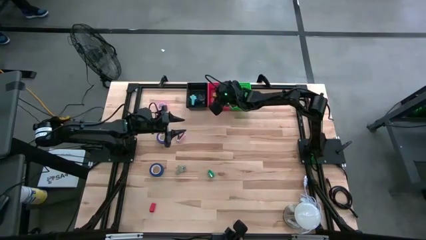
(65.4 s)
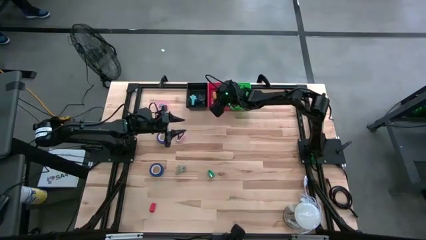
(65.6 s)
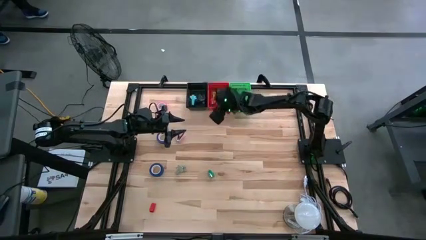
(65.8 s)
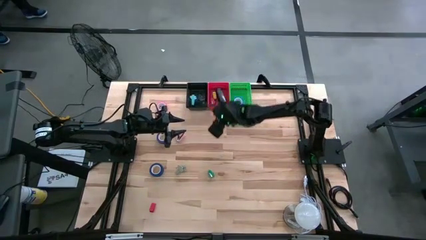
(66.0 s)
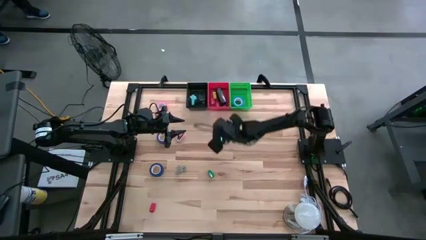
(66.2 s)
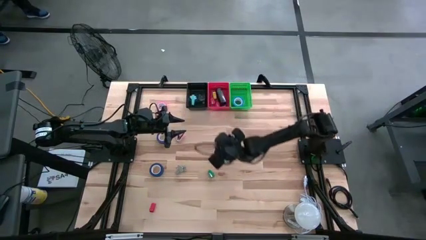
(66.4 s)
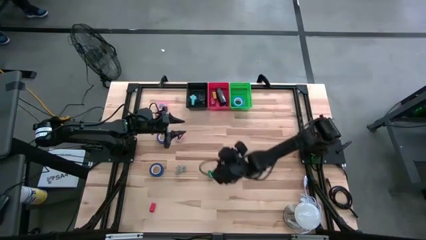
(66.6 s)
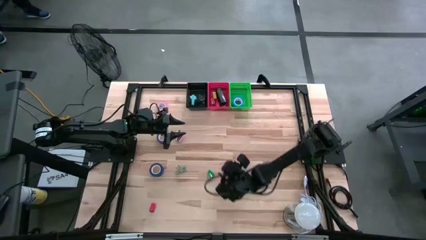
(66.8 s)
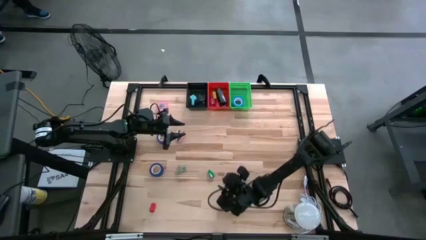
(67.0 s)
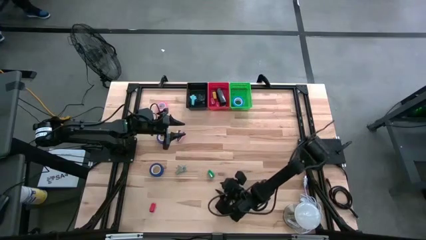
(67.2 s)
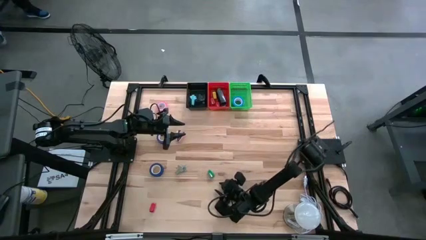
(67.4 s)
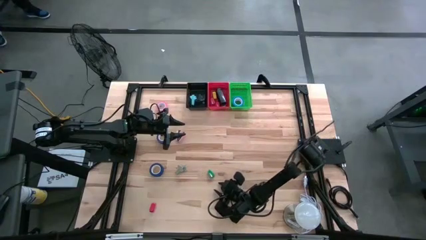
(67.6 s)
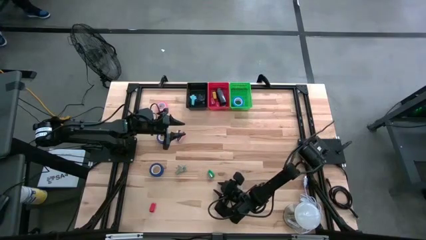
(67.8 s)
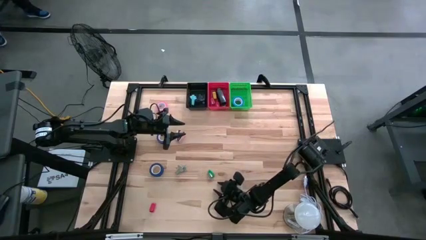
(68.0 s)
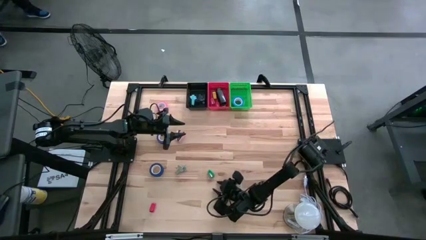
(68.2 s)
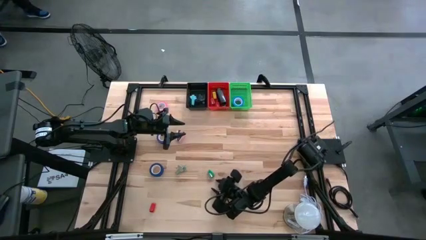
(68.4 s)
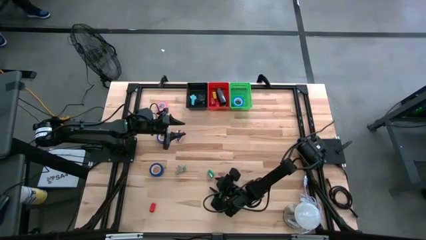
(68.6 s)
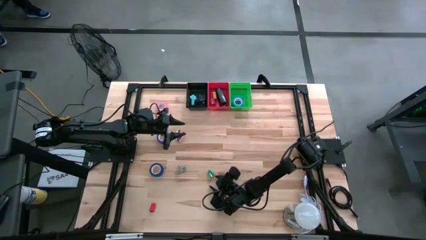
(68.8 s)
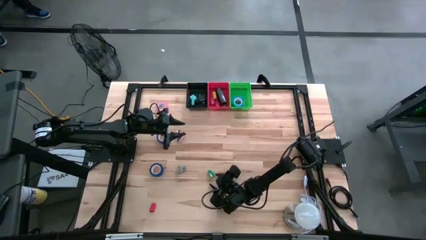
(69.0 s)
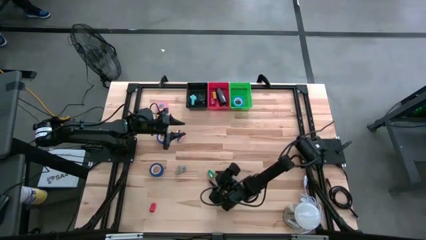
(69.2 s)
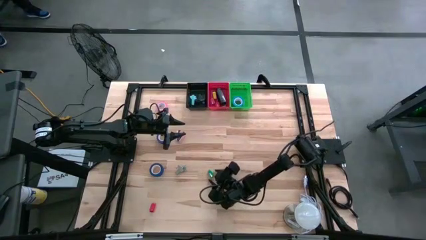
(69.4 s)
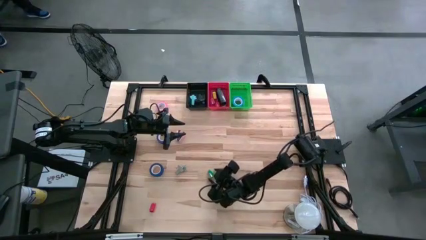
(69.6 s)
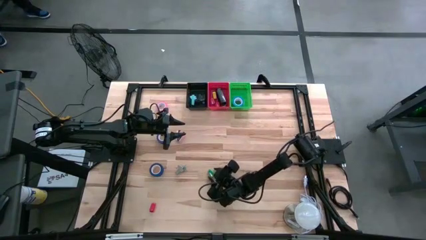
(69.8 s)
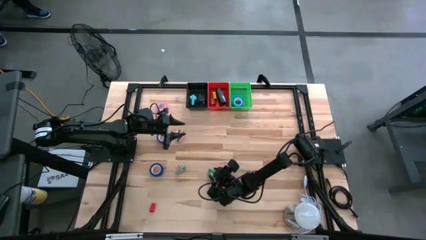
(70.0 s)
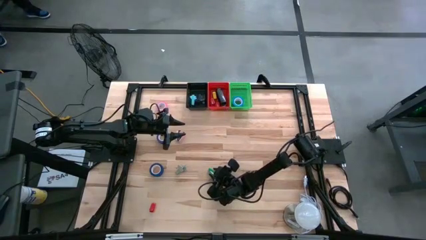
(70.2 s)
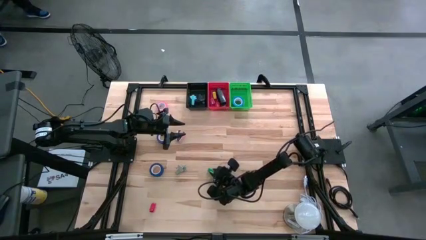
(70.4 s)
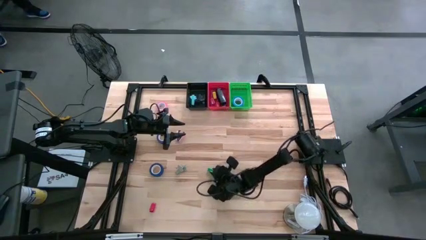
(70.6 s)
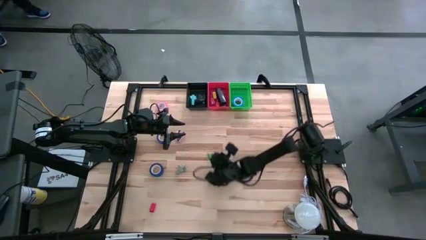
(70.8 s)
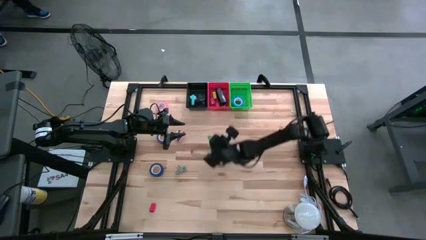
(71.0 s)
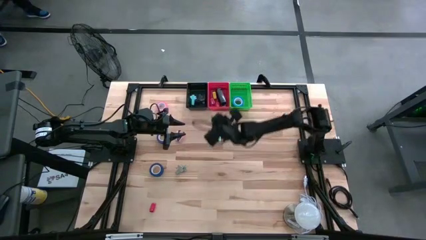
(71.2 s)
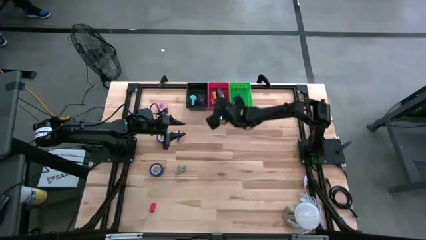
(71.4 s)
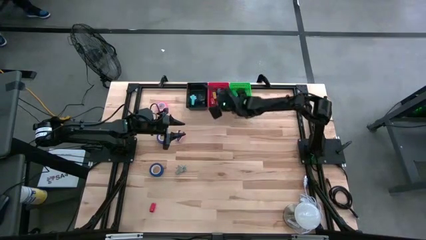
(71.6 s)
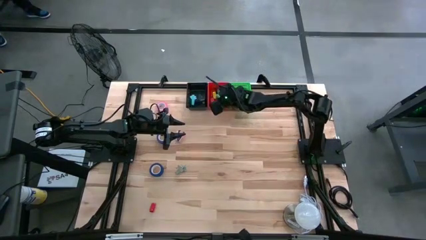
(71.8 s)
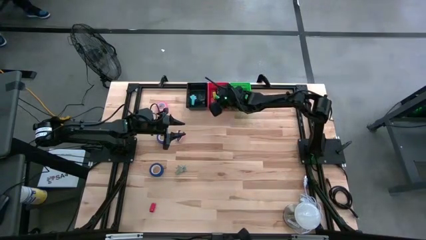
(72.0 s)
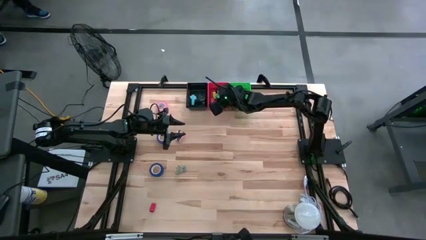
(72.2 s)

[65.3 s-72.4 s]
Task: Pick and place Stapler, Stapler remover, tape
Put the small green stapler into the red bin

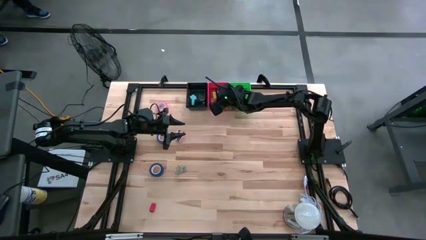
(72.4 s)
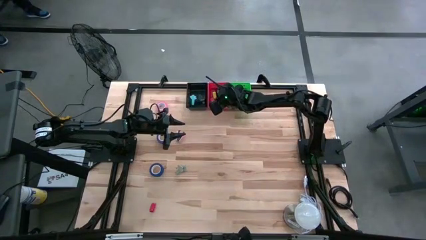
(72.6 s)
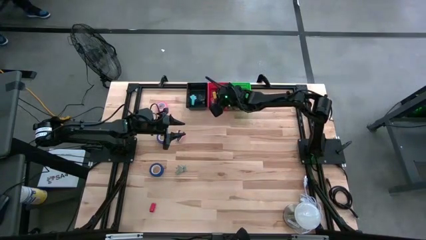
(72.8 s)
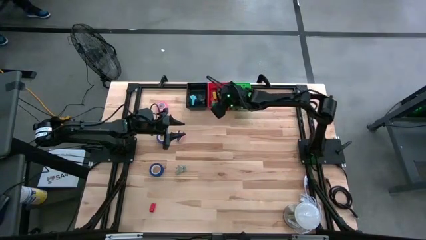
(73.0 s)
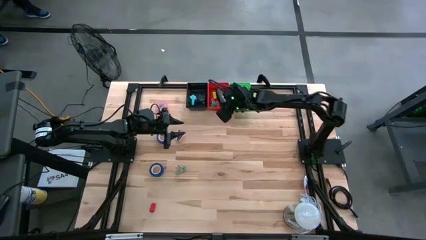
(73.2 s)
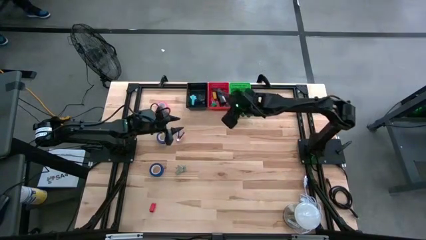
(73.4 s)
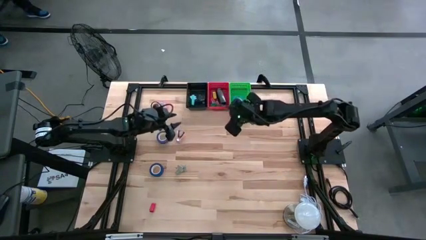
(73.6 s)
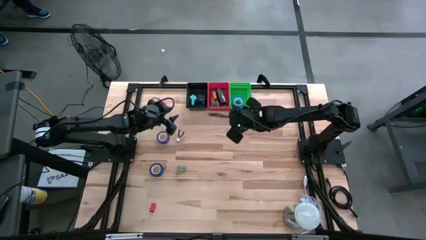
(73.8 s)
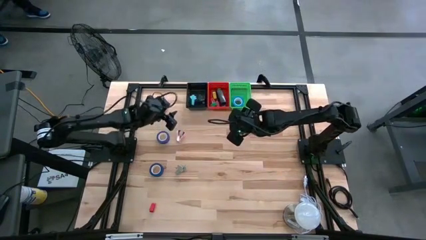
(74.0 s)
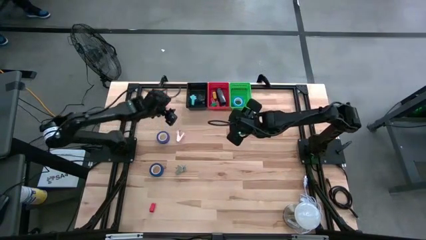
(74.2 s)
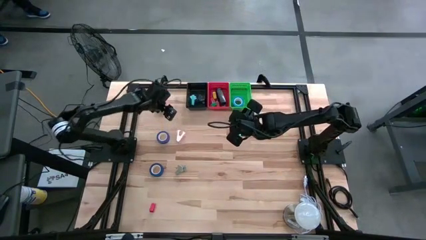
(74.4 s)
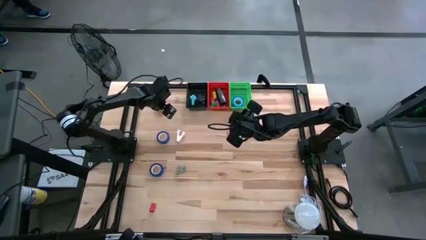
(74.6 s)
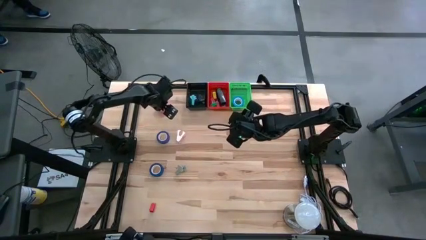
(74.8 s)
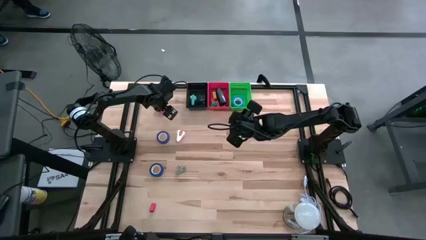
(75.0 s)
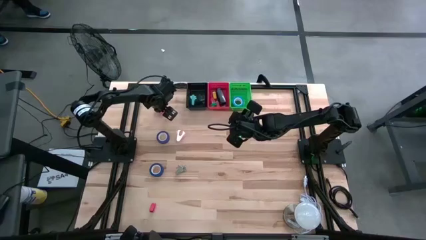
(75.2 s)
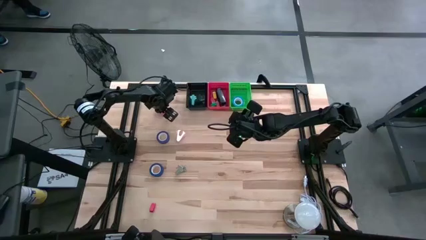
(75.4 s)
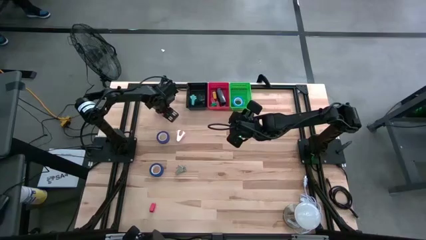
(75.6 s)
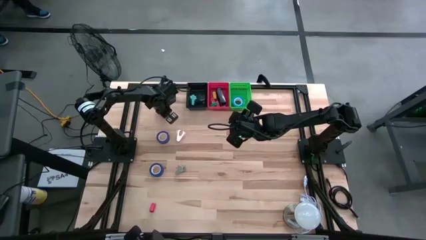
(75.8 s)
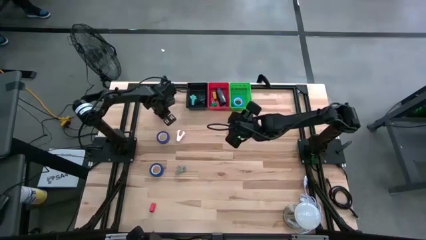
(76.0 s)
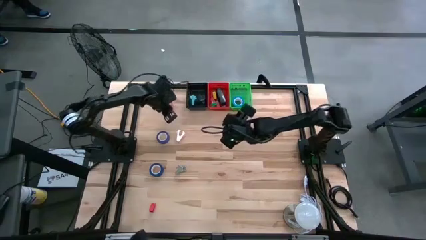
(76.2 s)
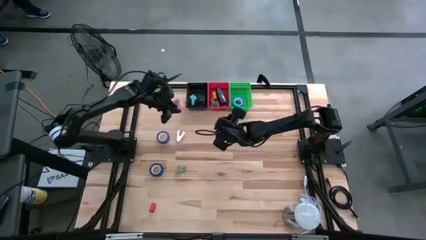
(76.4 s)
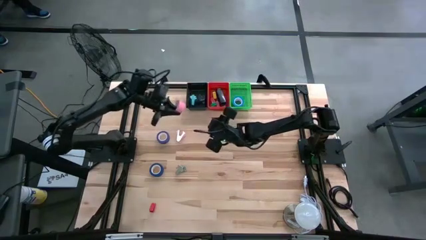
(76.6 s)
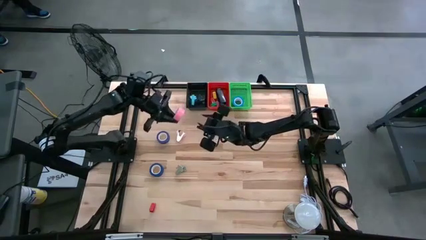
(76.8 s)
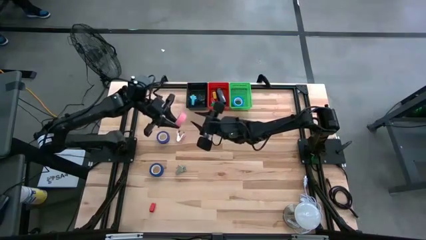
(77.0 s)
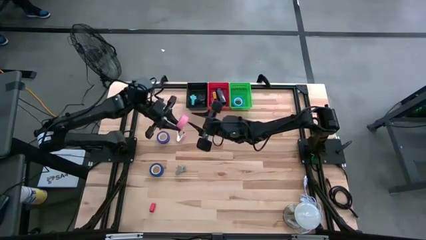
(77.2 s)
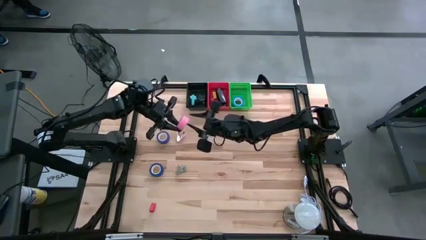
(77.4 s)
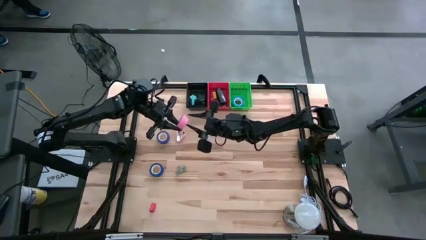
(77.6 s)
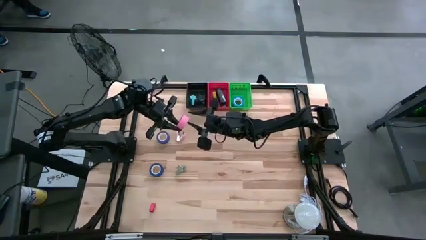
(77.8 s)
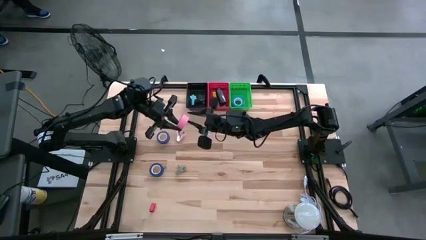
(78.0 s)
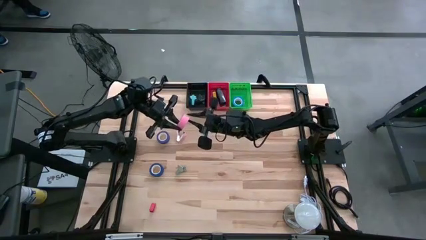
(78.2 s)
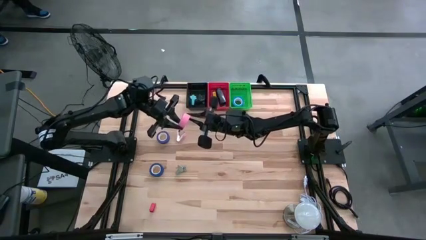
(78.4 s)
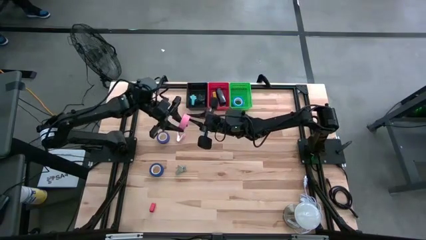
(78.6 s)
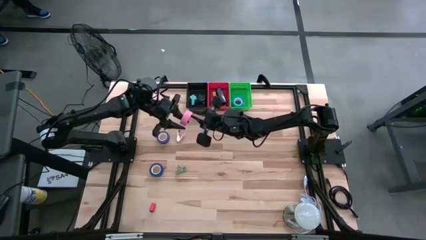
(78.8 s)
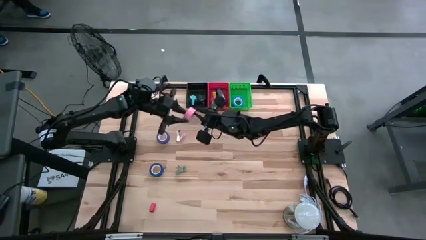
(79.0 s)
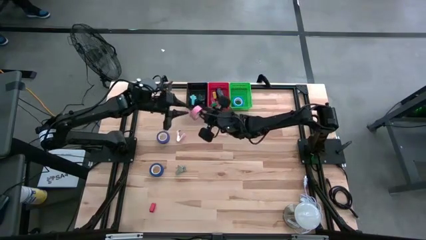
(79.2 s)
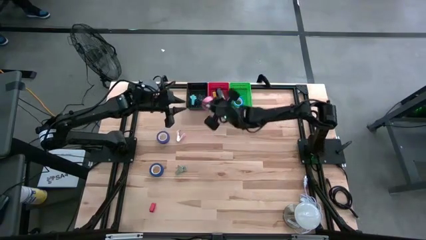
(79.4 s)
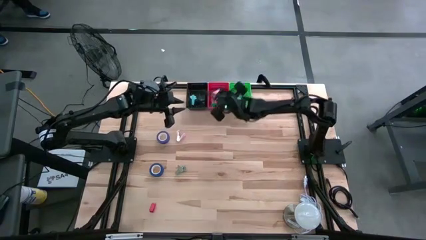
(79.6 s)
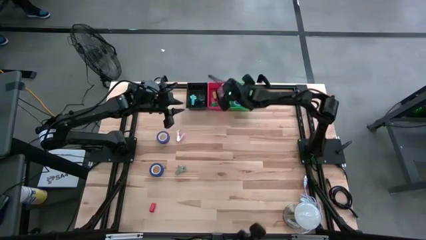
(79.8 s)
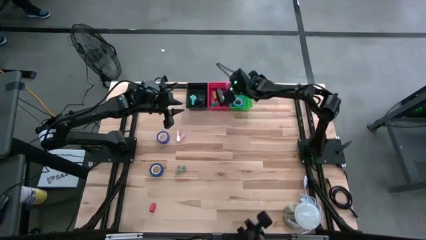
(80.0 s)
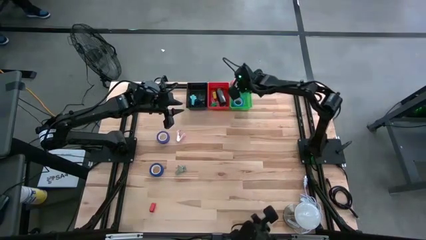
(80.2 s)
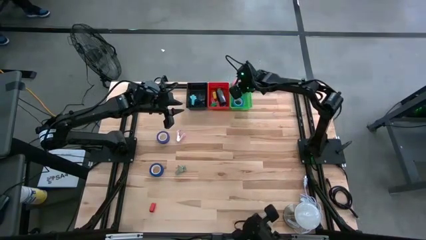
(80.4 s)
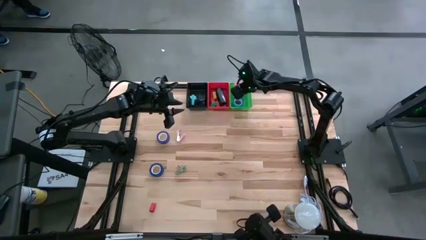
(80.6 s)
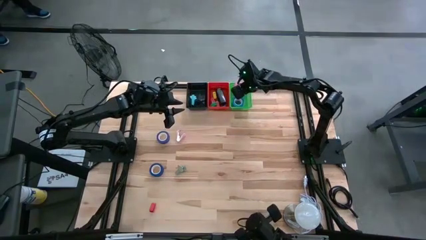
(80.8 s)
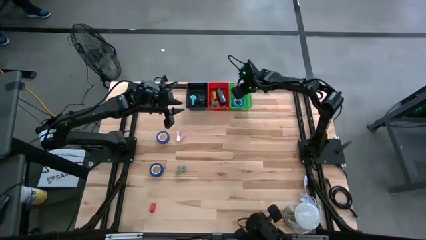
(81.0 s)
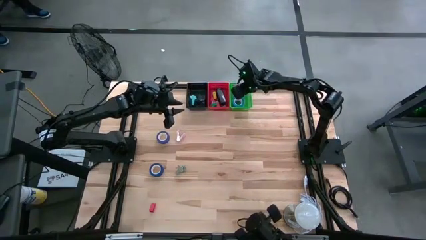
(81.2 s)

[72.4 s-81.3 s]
Put the pink tape into the green bin
